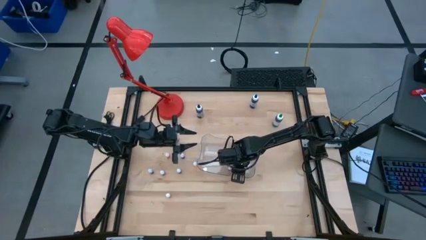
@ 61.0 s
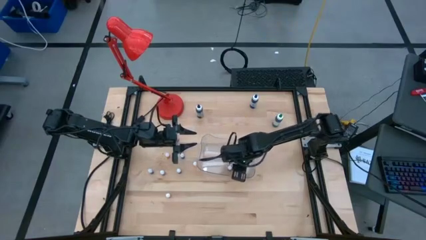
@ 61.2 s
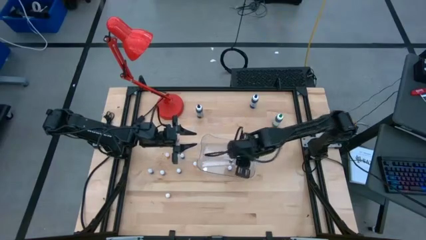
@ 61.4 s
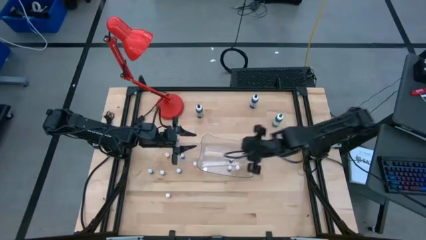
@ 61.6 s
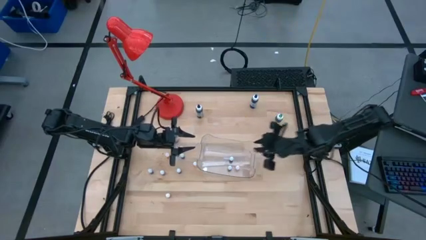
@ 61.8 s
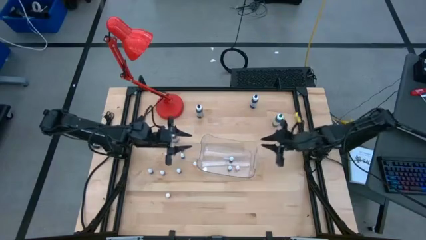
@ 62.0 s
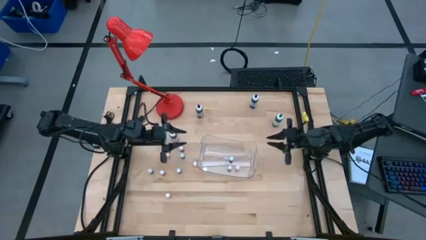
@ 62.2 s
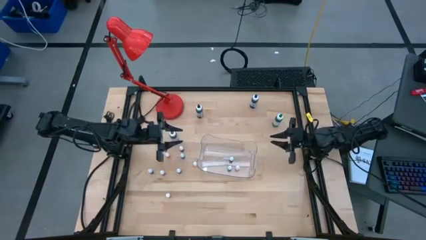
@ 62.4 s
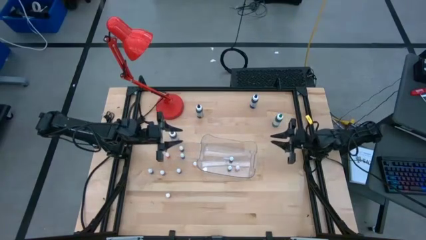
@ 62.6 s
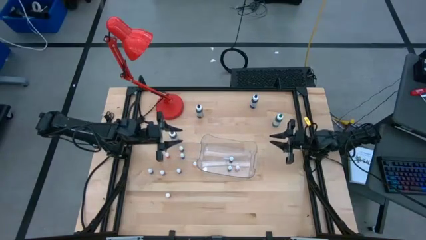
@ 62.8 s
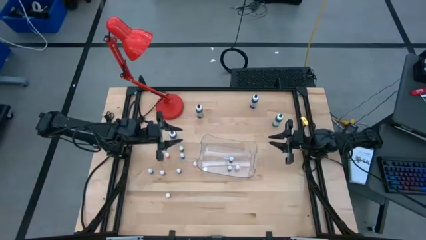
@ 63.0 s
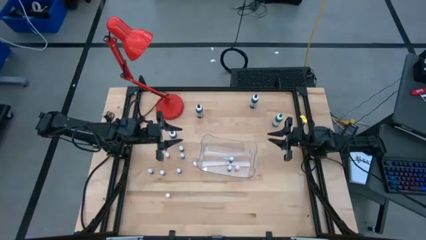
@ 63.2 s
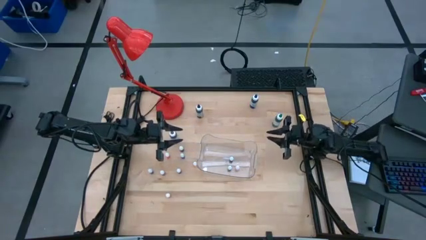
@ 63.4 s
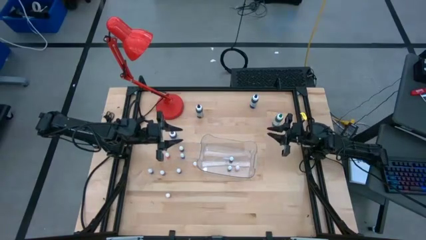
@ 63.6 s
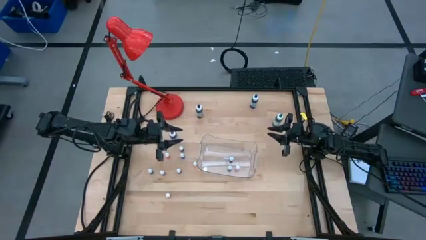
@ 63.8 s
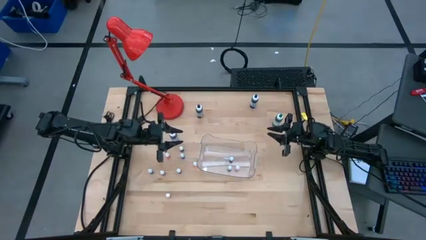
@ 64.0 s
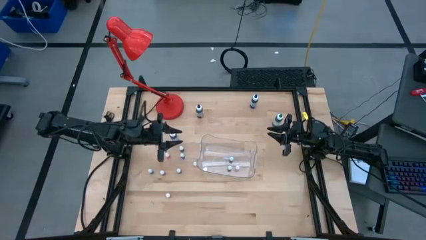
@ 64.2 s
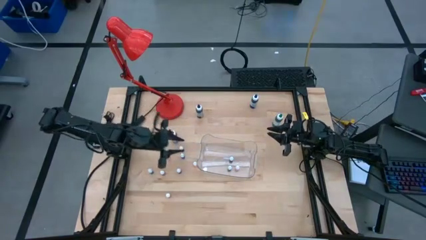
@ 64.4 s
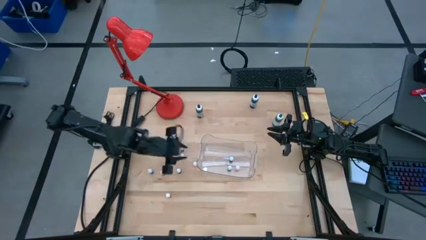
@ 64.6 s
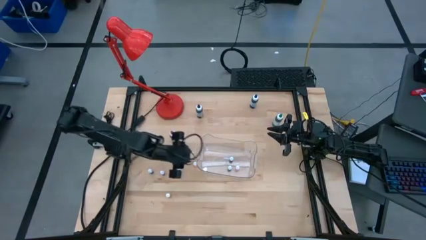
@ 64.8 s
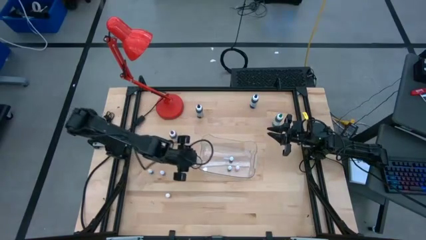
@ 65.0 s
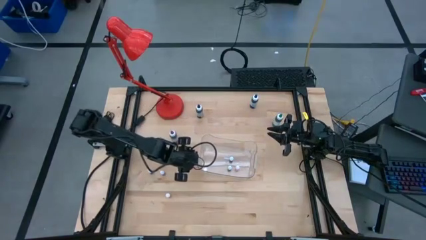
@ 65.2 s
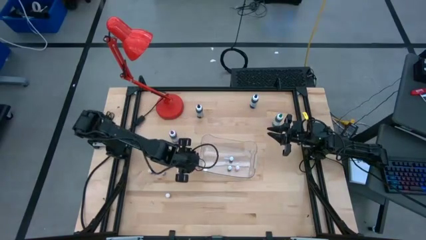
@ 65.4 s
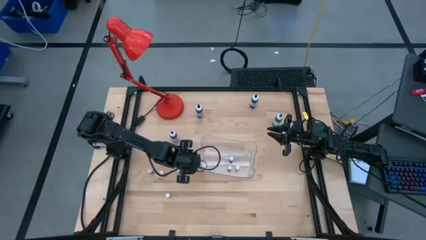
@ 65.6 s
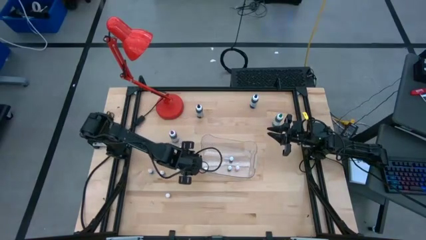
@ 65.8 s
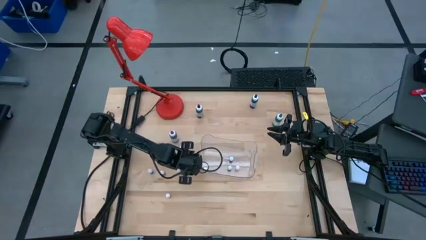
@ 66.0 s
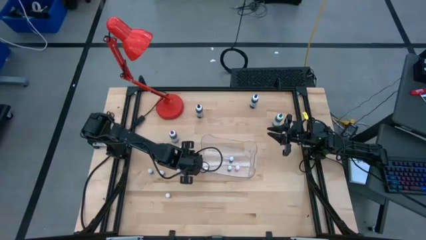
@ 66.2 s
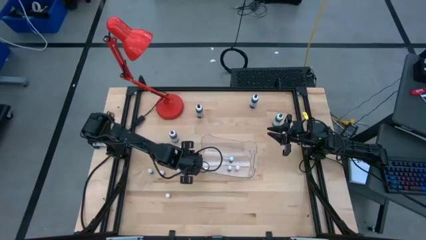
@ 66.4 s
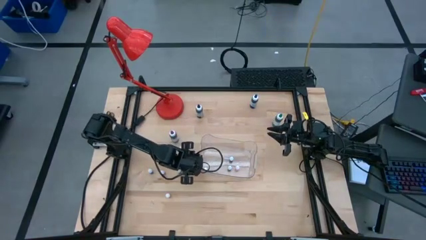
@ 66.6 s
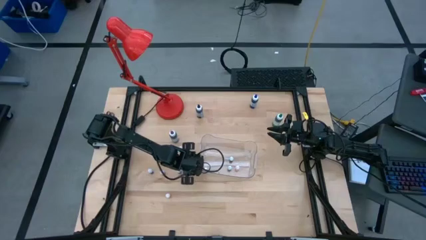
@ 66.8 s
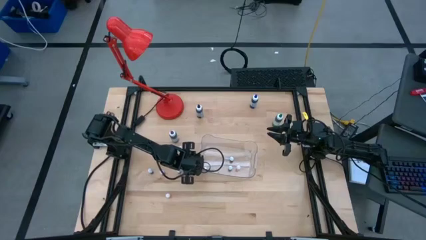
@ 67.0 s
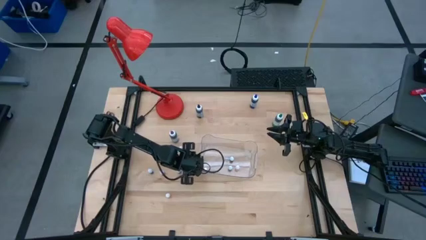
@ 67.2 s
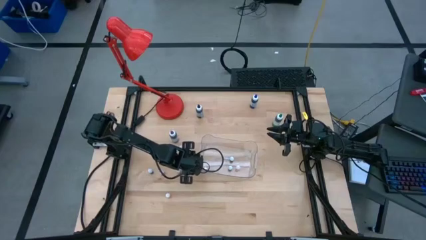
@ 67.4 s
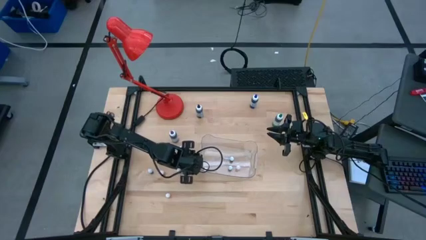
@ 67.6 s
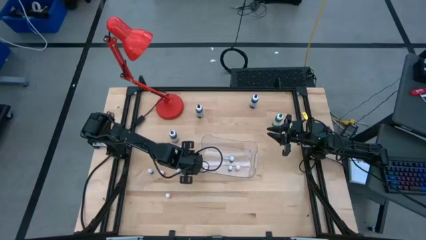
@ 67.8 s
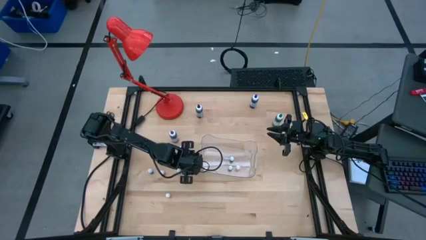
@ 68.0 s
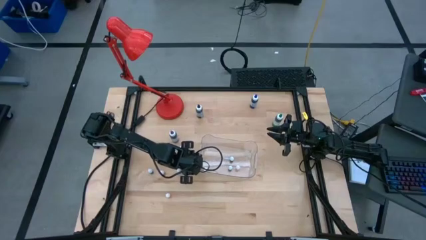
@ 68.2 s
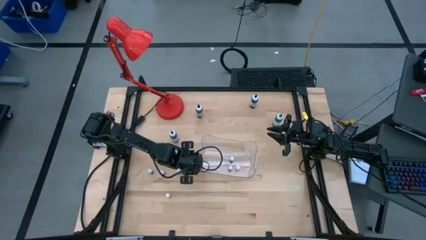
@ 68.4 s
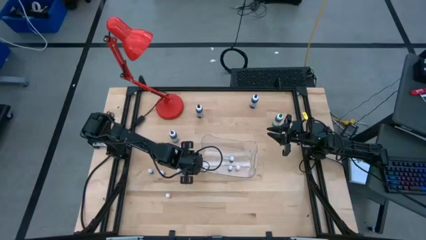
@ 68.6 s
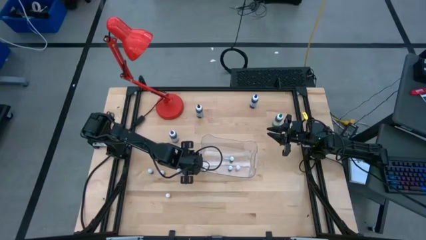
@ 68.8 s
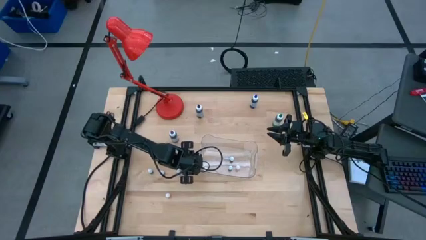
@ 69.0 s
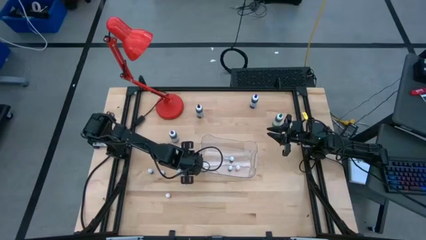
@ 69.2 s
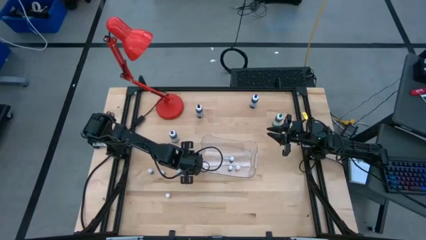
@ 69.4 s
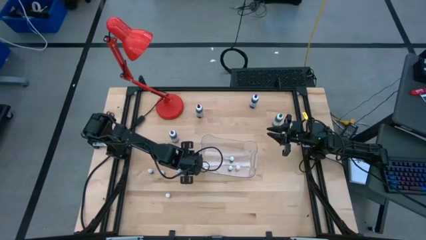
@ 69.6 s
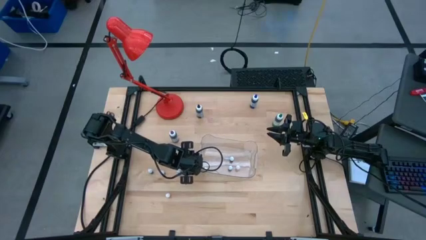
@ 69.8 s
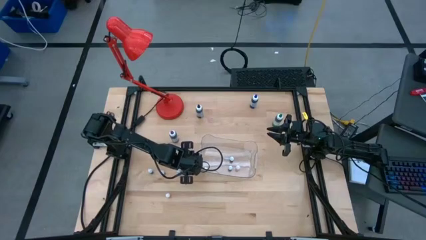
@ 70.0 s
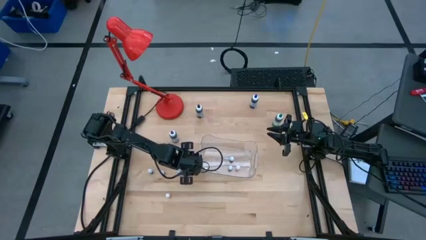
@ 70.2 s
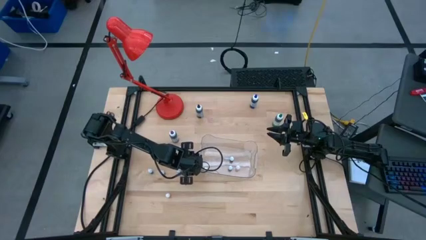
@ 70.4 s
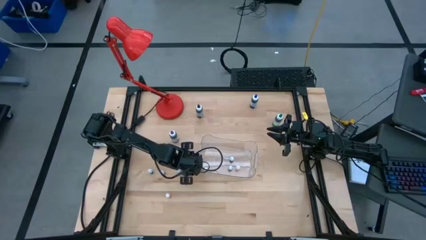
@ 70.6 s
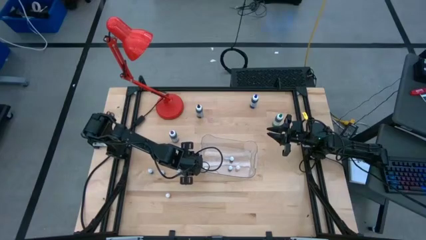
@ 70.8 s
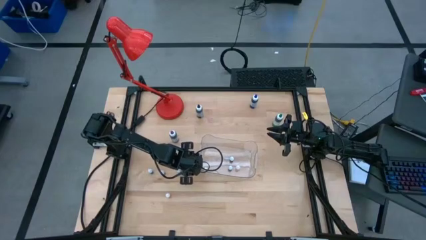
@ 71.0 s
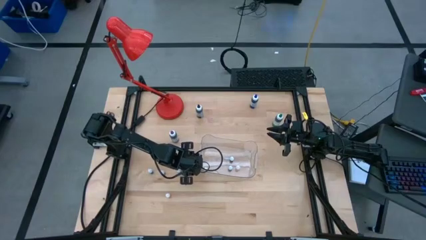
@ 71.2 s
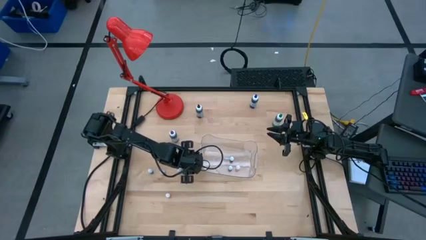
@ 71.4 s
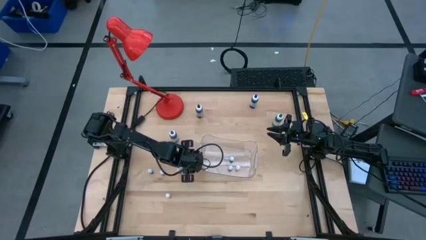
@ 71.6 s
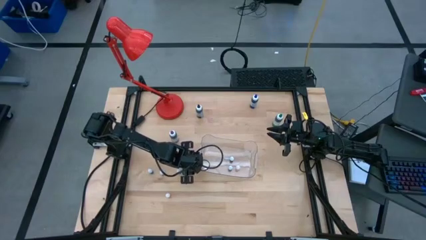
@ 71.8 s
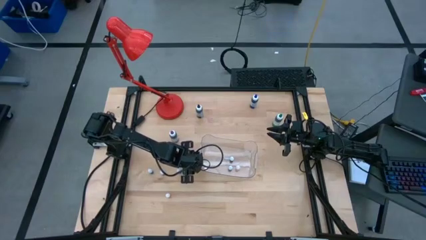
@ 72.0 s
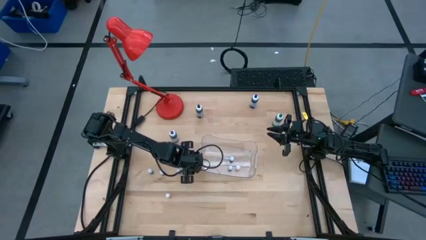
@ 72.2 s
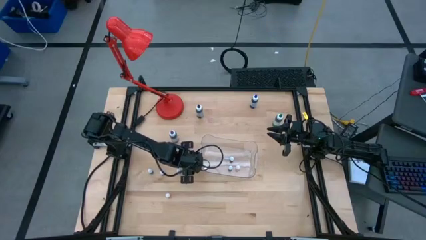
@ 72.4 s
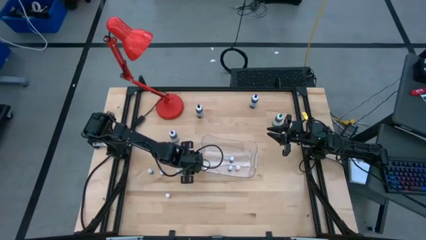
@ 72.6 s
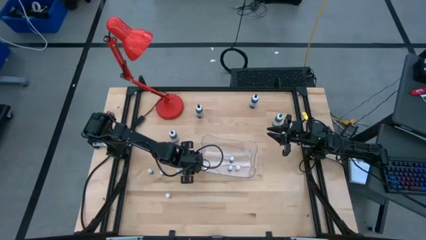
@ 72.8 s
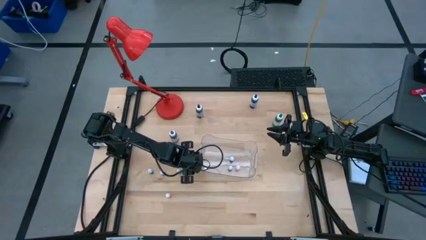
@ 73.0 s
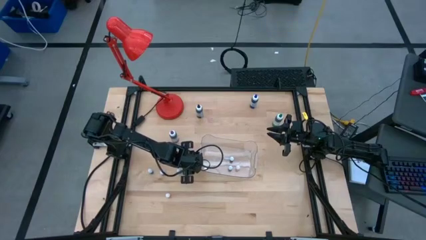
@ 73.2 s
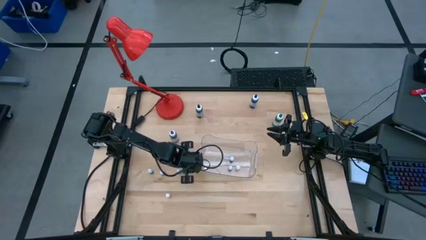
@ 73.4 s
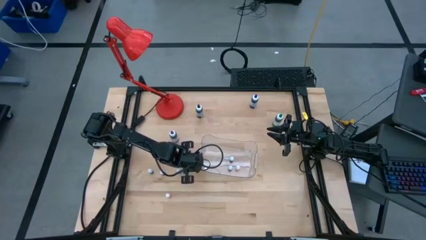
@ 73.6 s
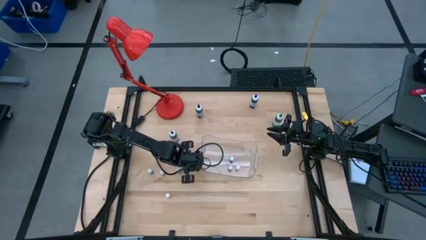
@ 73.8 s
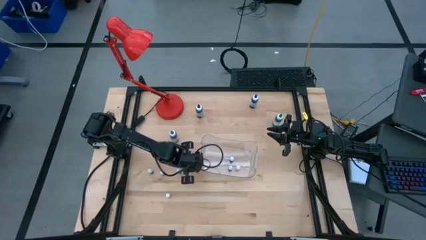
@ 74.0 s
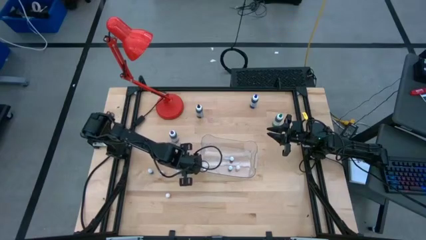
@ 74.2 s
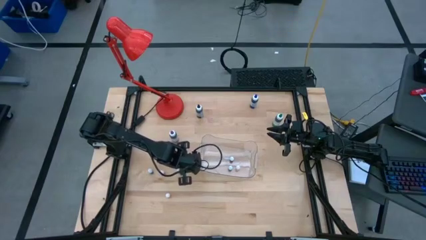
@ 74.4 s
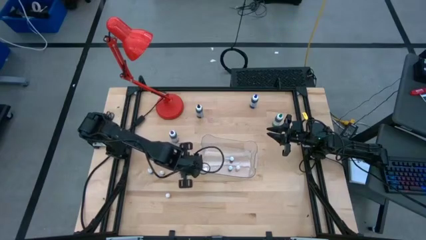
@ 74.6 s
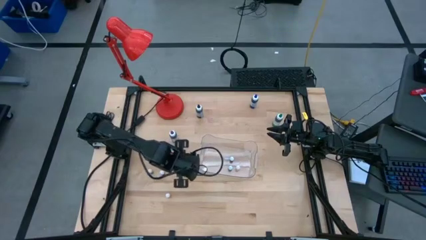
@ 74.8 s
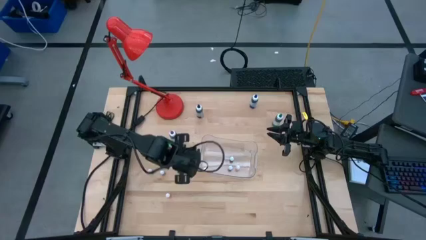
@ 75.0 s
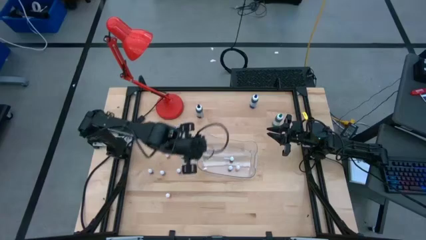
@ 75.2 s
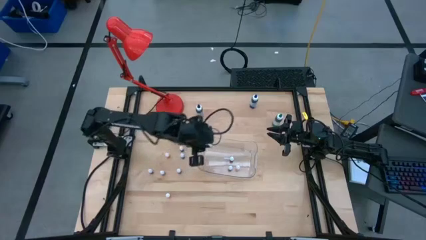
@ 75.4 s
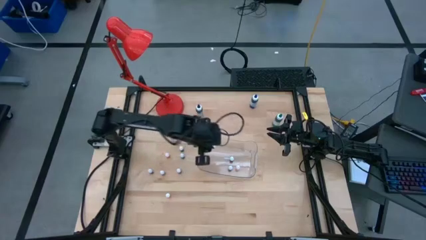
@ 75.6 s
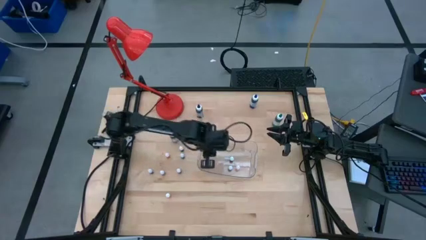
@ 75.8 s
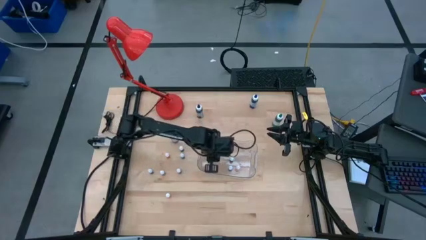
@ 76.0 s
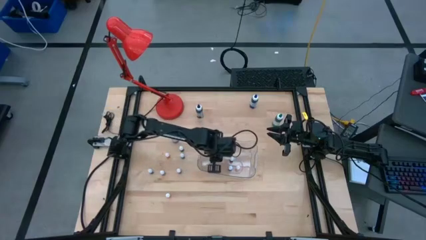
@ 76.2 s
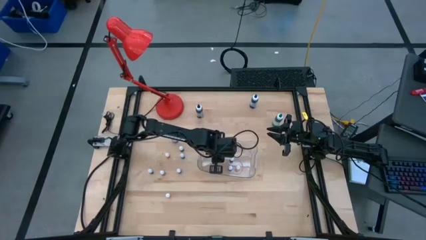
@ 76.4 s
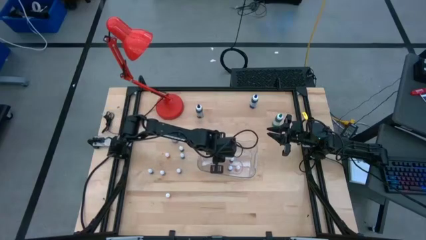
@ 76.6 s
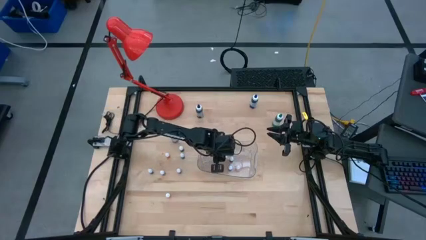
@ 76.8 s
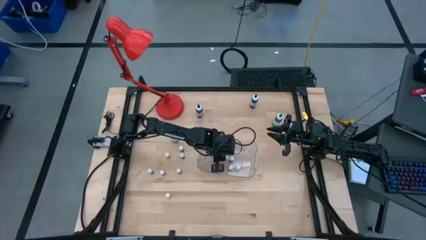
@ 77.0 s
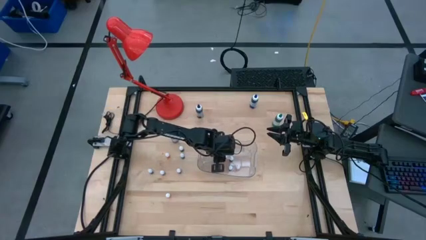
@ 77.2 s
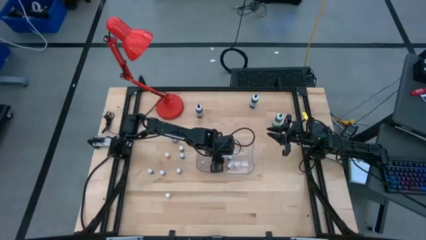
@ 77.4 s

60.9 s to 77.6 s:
Task: Pick & Place food coloring
Put the right small orange food coloring bottle into the transparent bin
